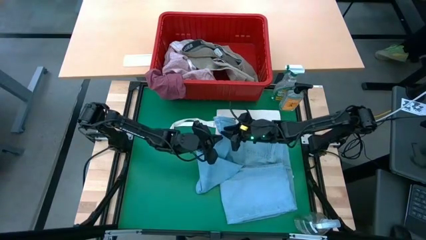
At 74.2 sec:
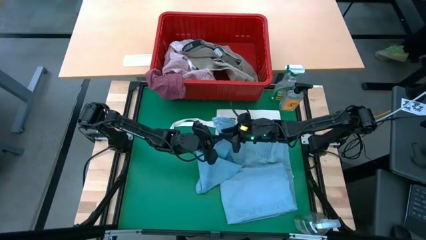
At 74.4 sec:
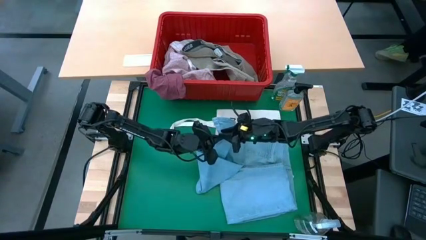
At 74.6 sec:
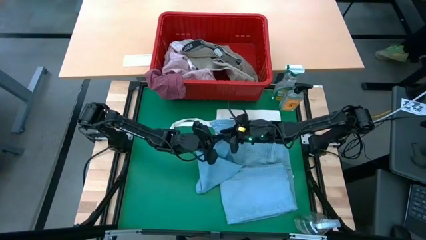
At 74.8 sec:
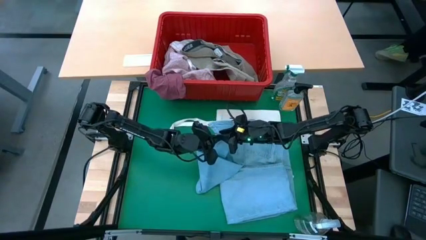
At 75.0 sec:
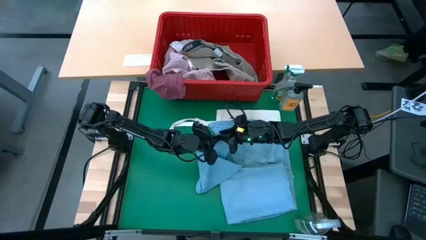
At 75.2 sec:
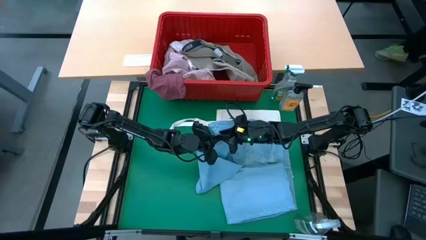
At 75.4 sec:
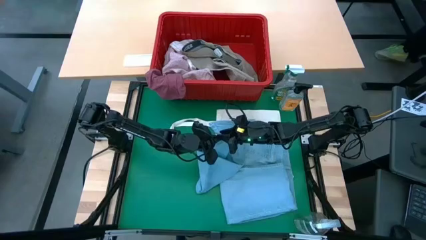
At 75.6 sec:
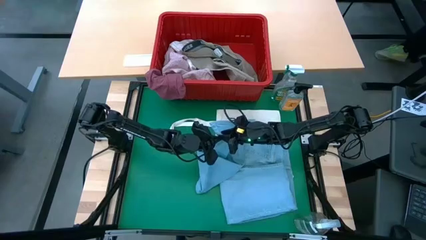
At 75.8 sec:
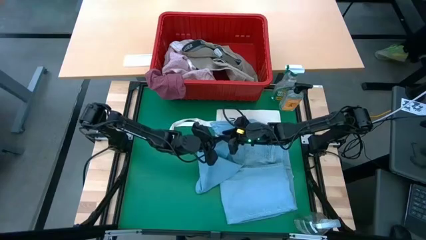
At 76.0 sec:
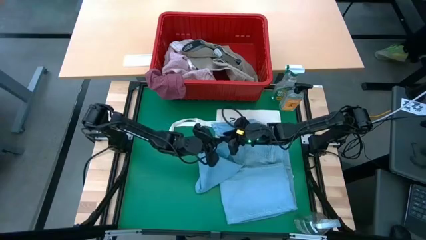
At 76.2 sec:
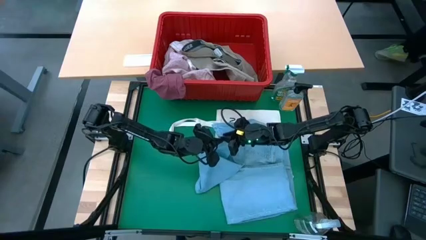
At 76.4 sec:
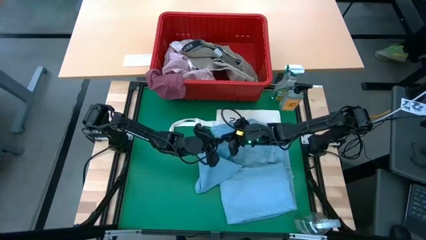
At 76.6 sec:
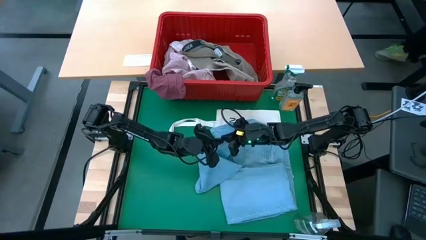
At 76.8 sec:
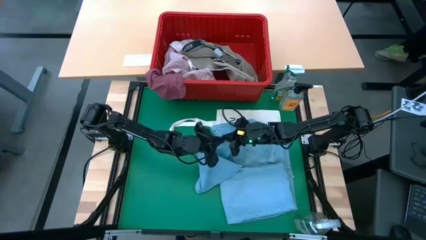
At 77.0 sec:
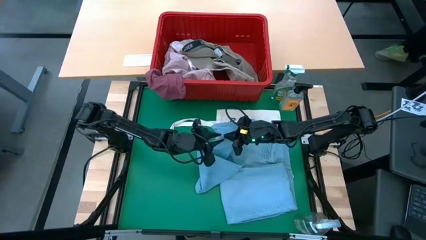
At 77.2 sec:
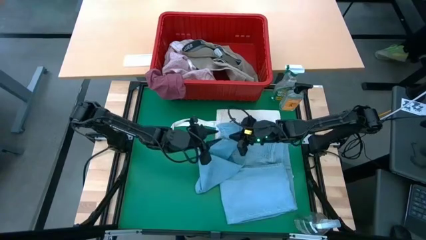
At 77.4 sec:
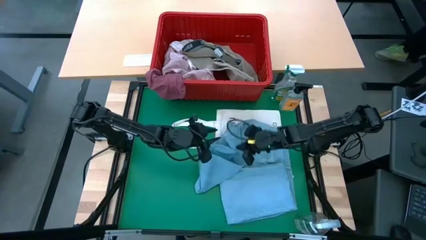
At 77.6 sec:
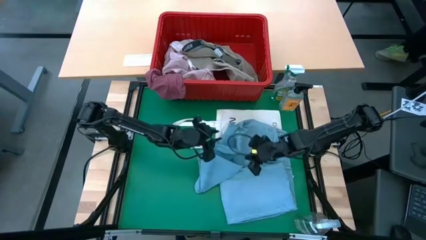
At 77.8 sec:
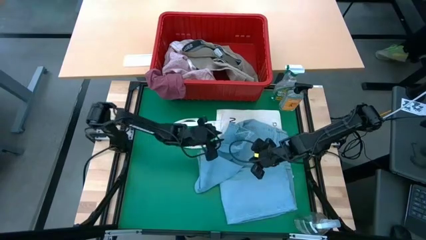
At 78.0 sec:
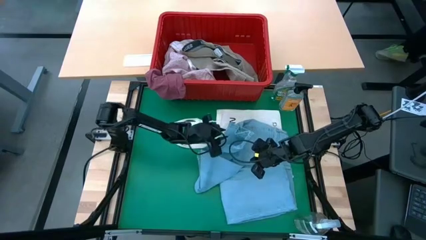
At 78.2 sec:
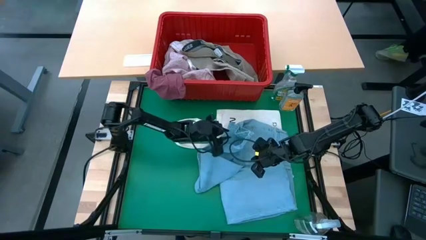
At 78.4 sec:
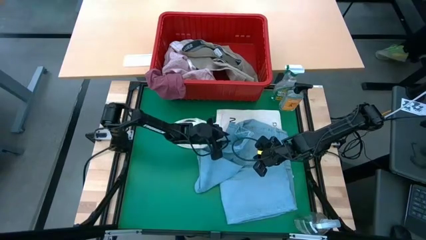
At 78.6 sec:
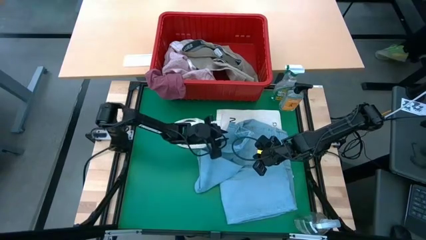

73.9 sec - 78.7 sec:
Task: Fold Laundry from Bin
Fold the blue pants from the red laundry basket
